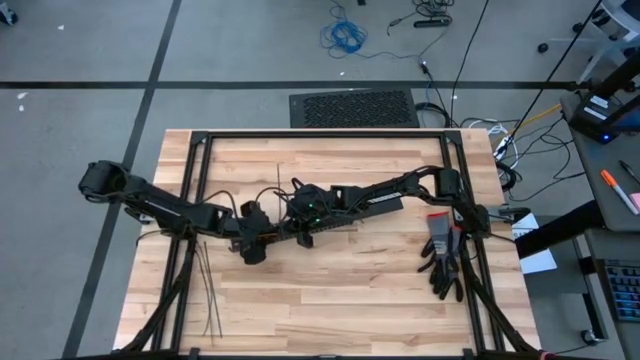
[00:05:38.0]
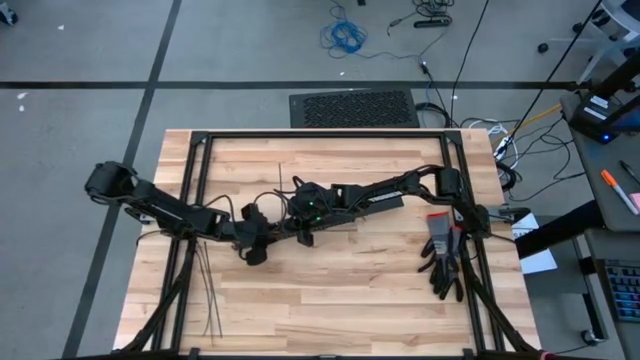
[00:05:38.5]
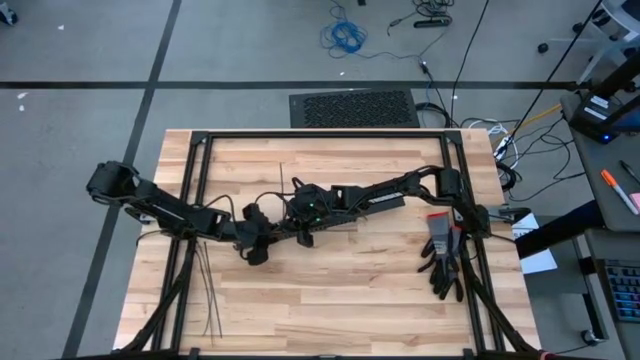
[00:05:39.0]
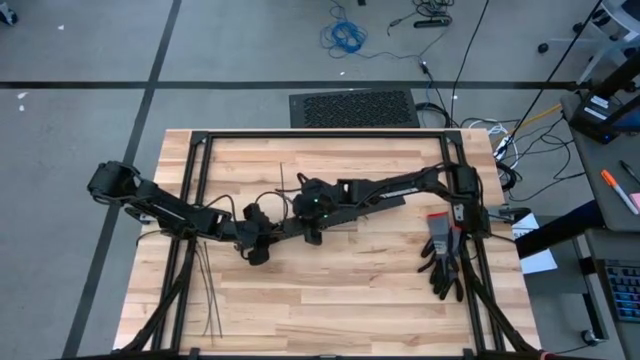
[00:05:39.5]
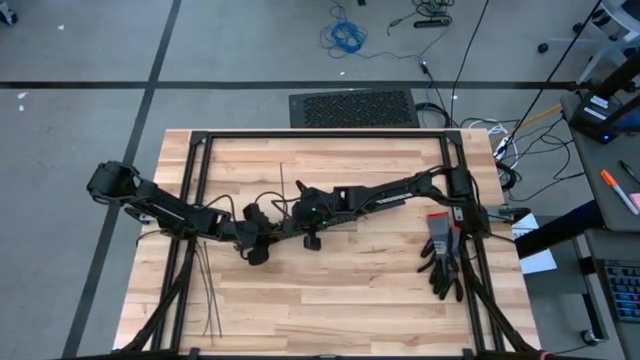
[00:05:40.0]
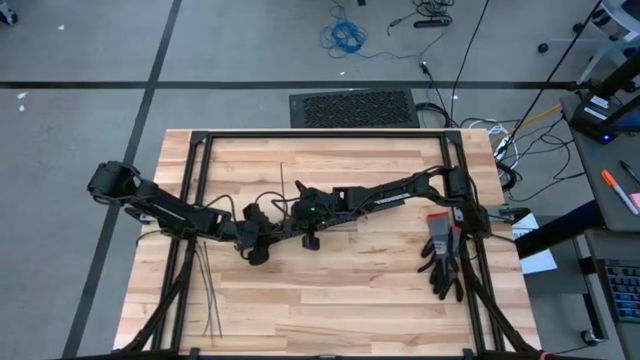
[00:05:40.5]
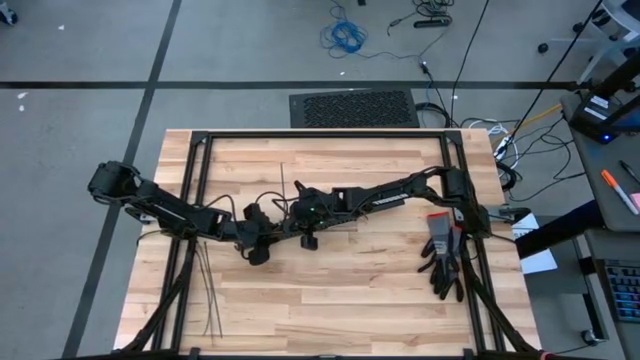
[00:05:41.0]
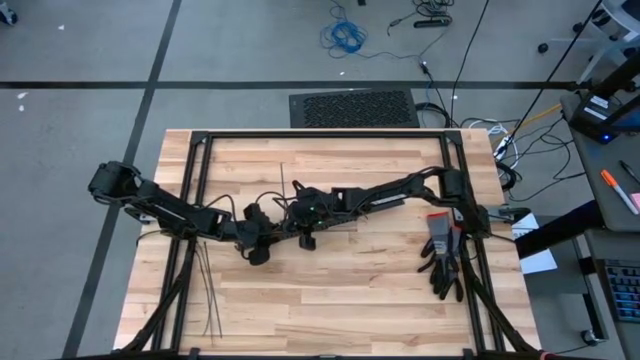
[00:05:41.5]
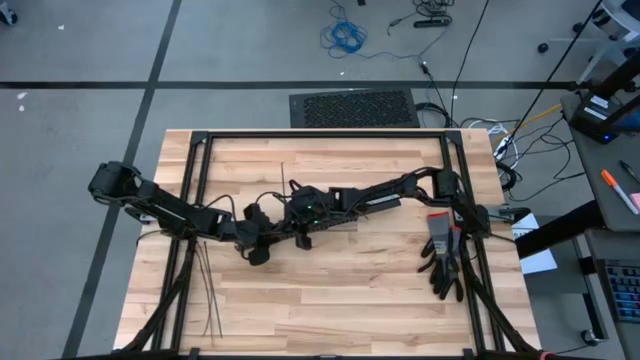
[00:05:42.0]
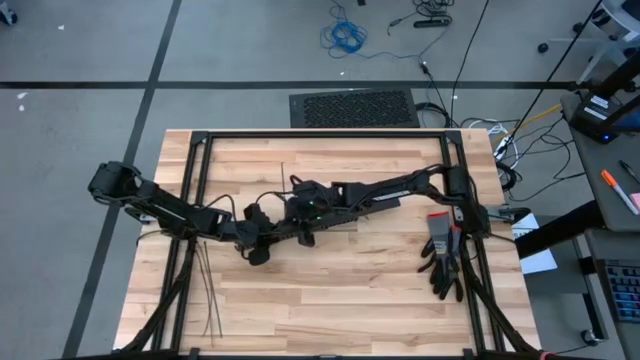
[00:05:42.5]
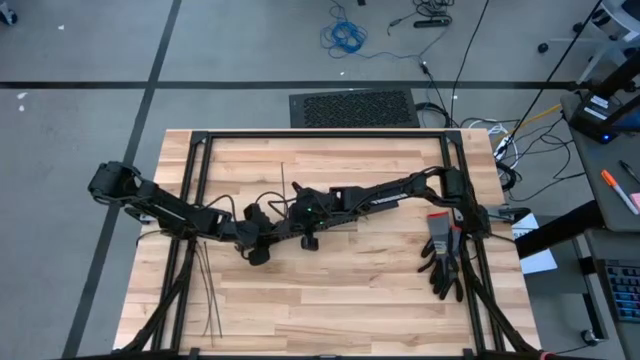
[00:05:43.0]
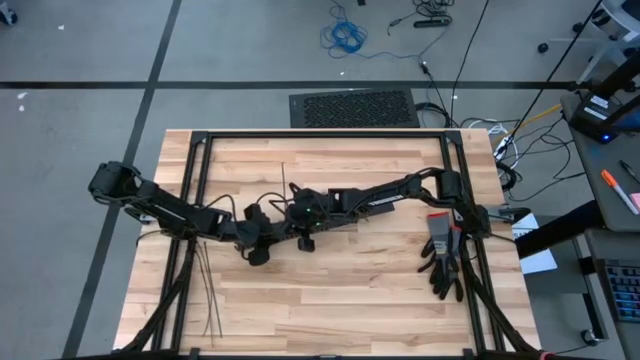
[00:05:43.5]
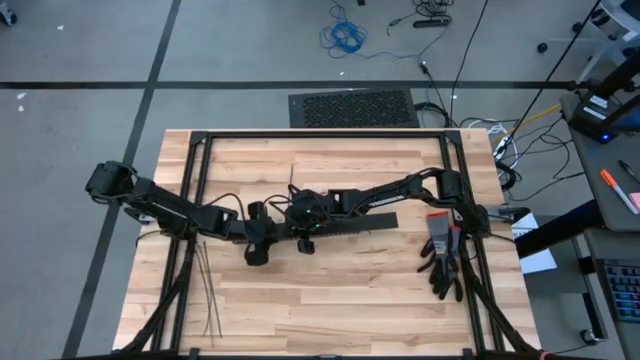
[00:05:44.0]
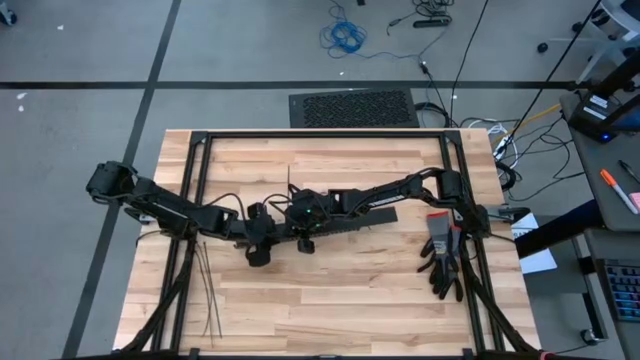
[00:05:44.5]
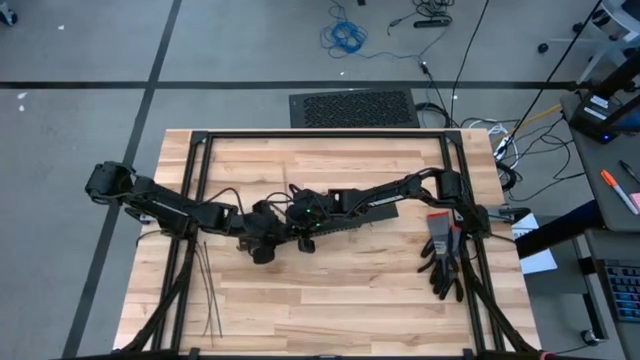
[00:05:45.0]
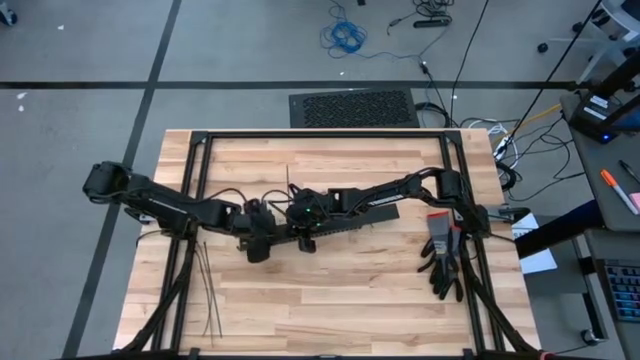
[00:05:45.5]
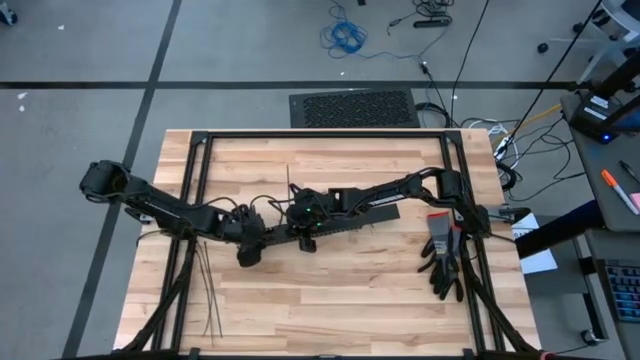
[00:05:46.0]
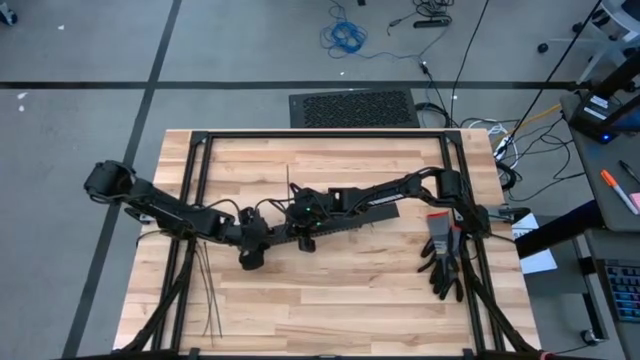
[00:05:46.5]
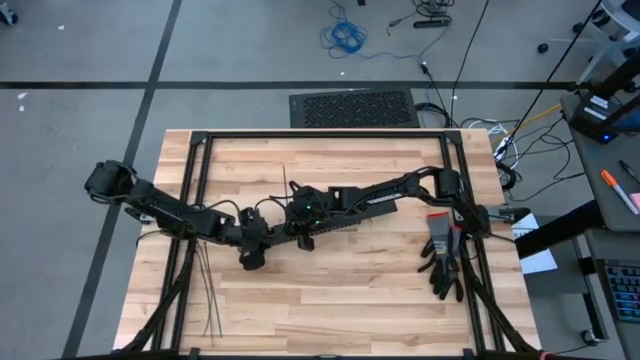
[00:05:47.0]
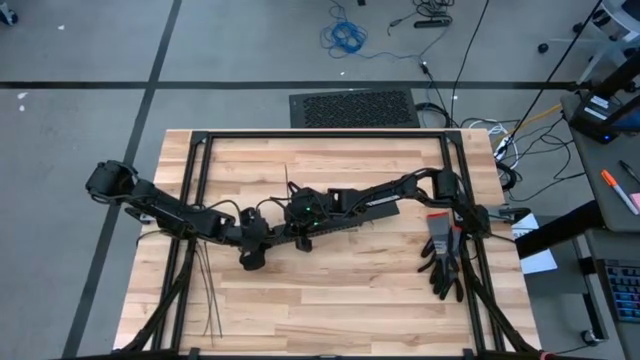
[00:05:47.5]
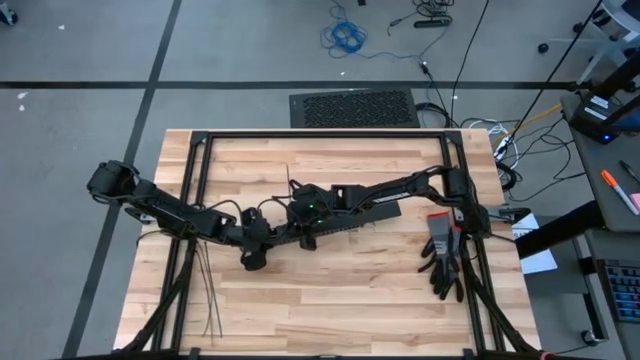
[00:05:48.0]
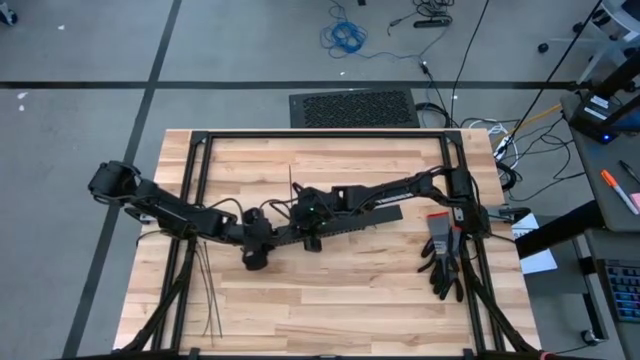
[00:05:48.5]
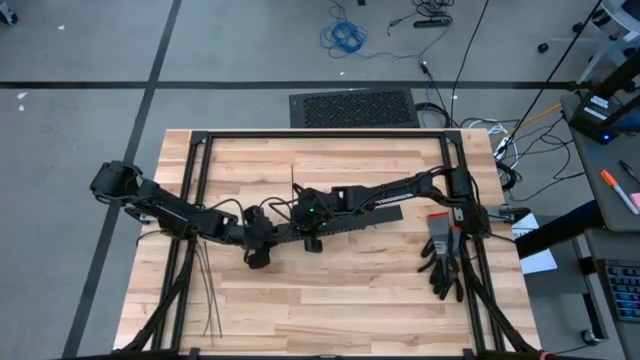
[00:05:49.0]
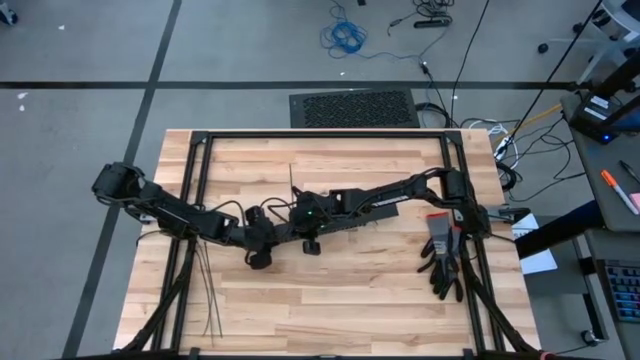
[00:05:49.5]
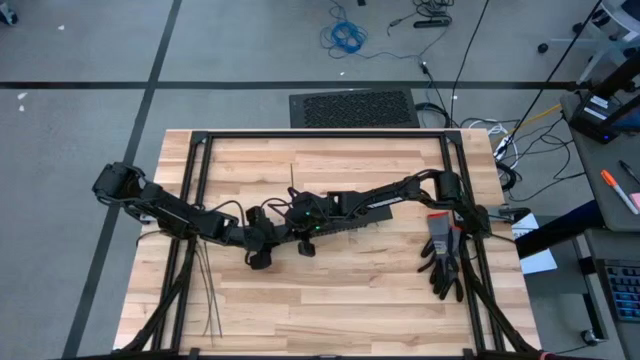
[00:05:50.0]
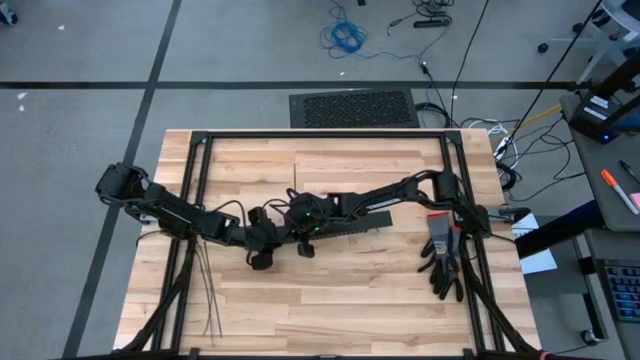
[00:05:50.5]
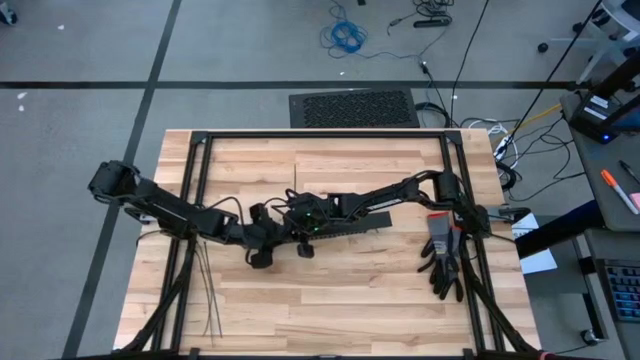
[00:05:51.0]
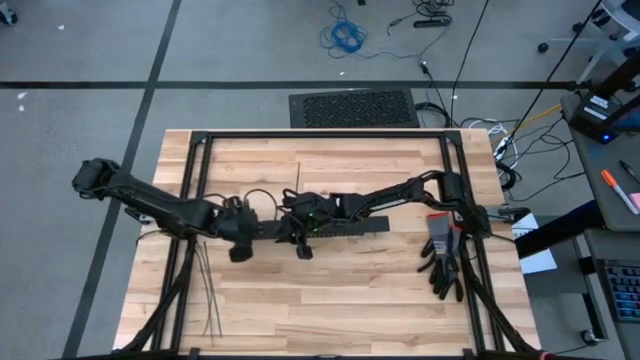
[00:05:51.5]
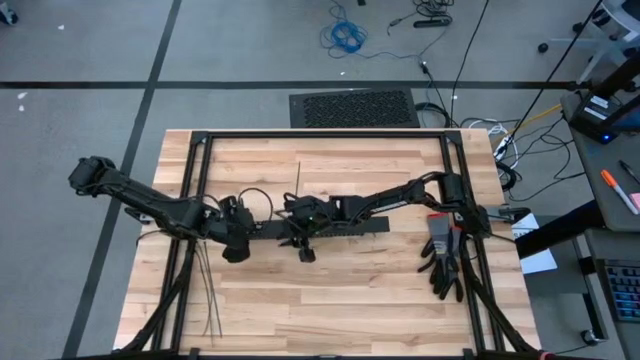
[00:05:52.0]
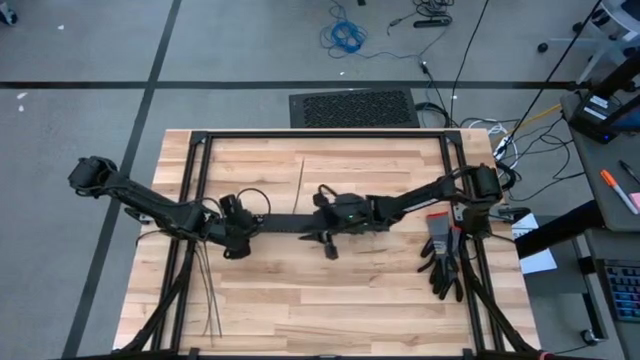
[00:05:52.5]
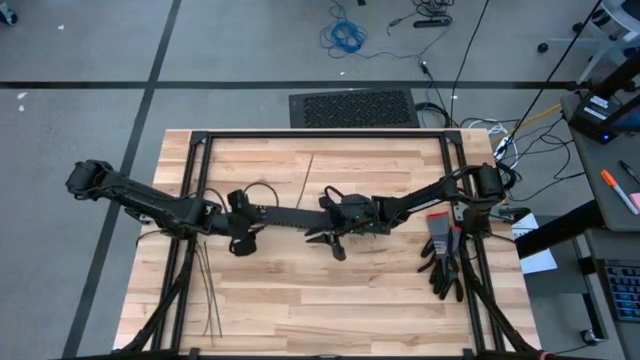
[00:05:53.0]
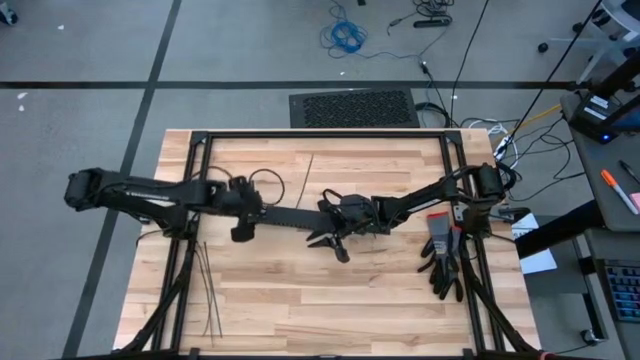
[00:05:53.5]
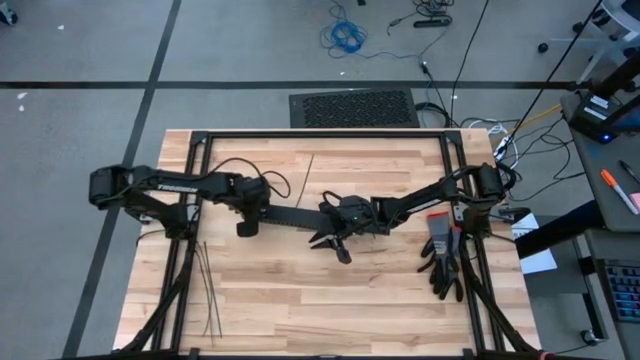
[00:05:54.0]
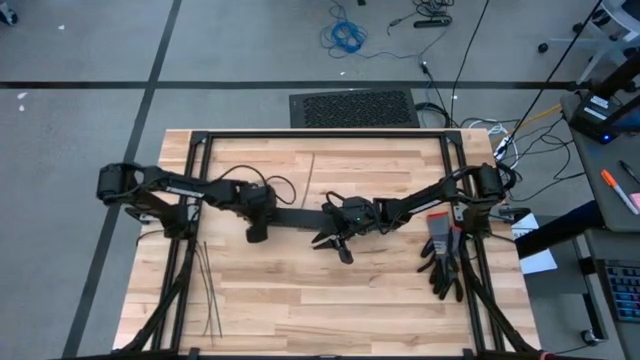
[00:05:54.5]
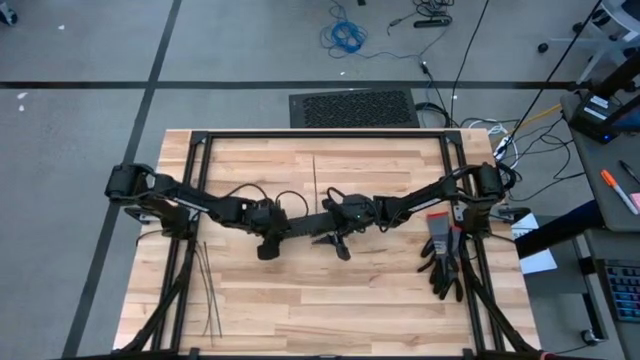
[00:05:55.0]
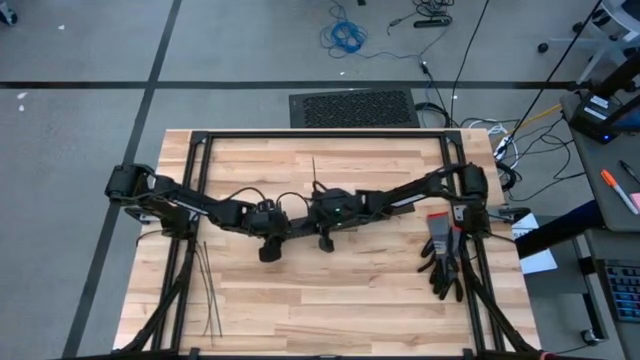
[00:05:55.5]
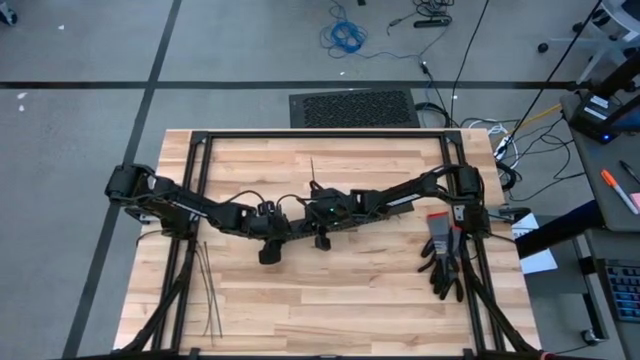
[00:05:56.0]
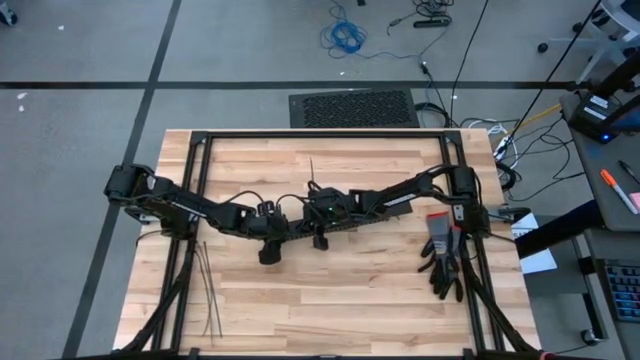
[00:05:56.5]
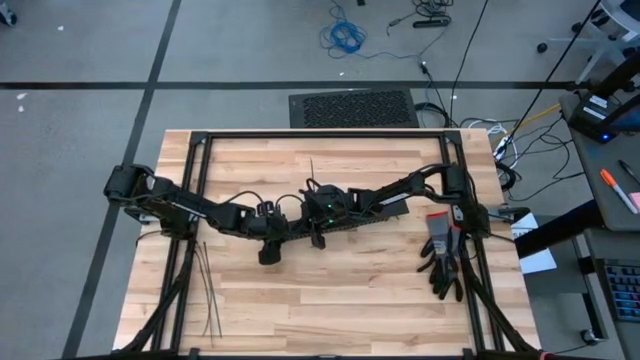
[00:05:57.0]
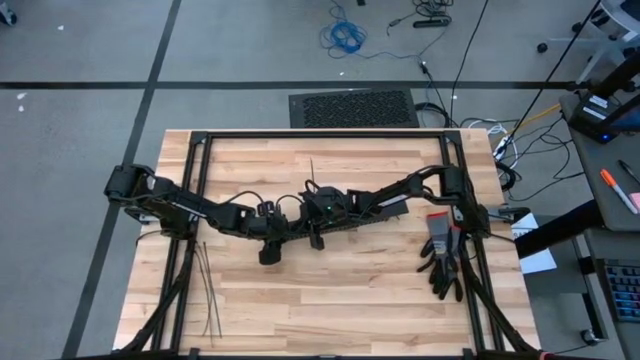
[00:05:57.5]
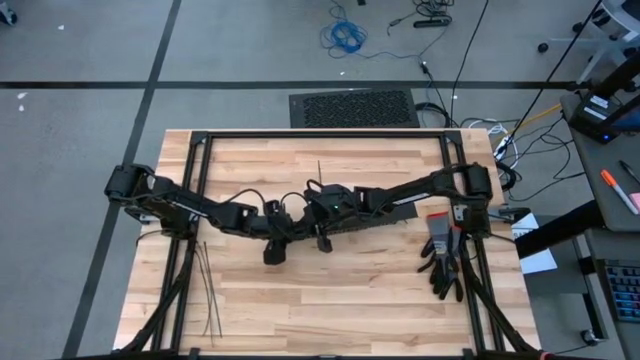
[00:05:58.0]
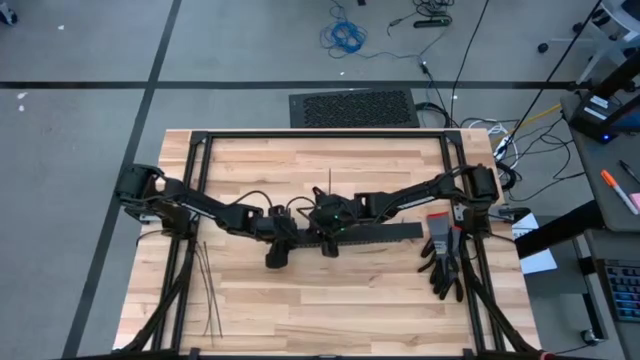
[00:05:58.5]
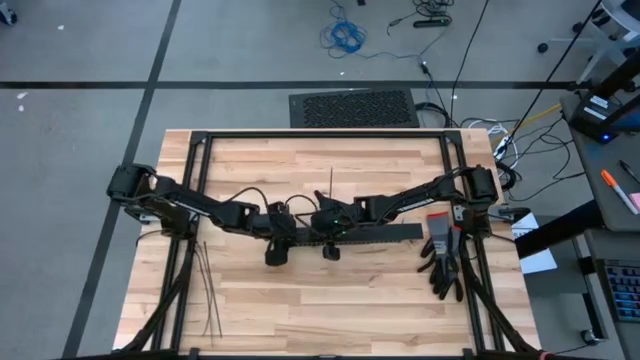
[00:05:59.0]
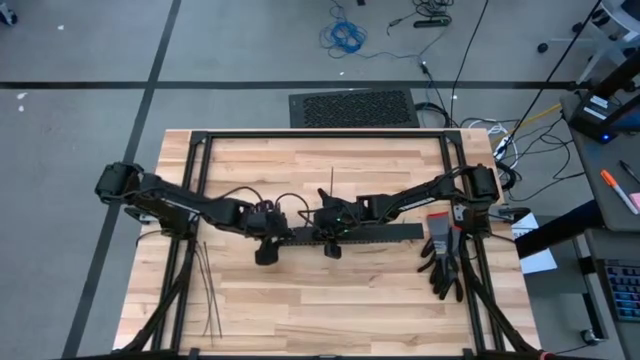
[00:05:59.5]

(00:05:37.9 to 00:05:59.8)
Task: Ziptie cables
Close the black cable duct
